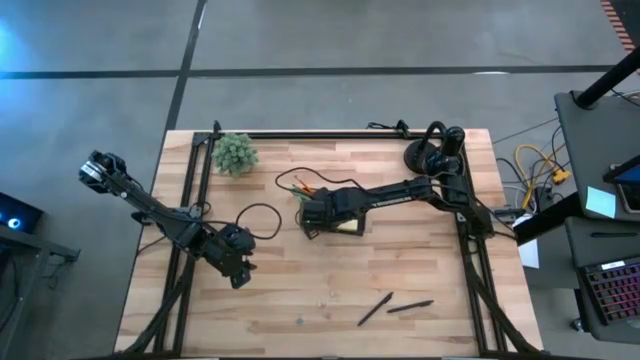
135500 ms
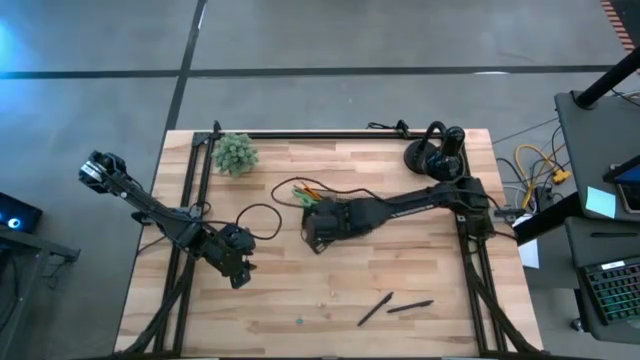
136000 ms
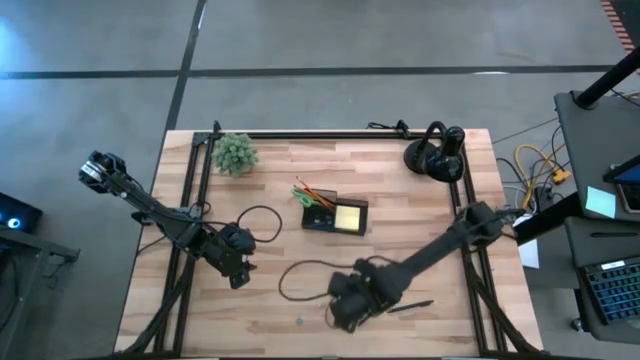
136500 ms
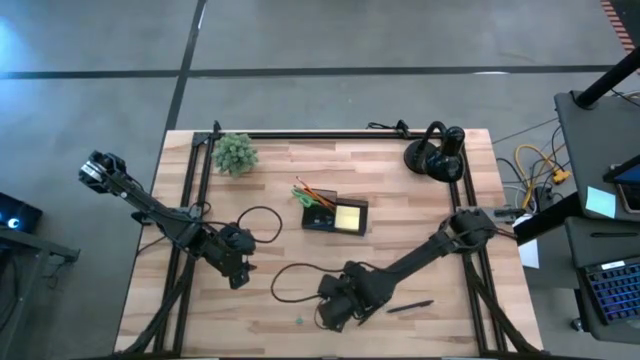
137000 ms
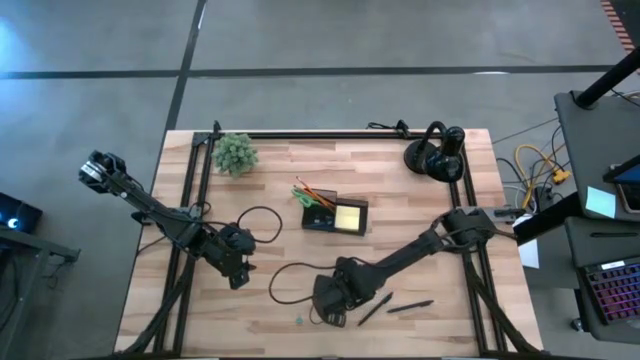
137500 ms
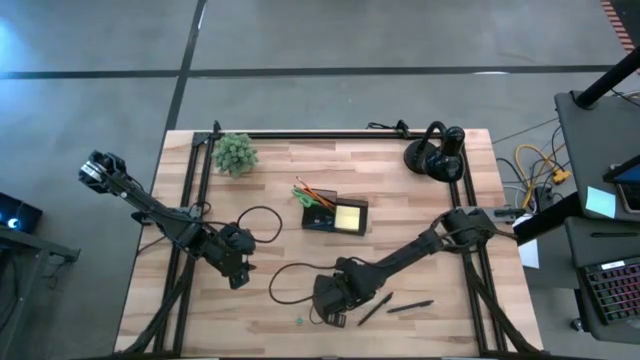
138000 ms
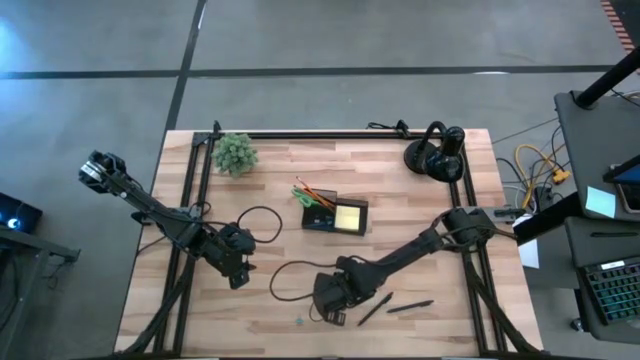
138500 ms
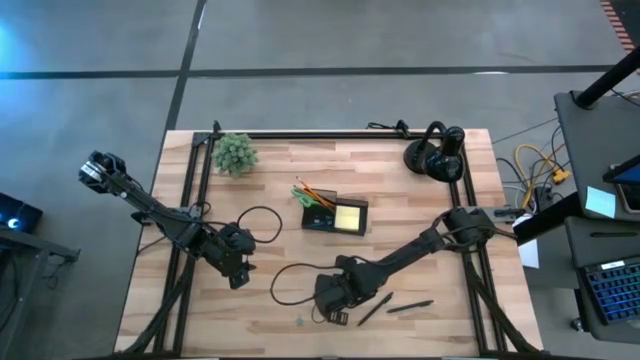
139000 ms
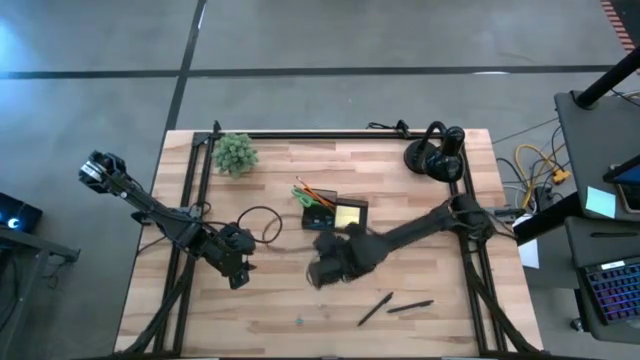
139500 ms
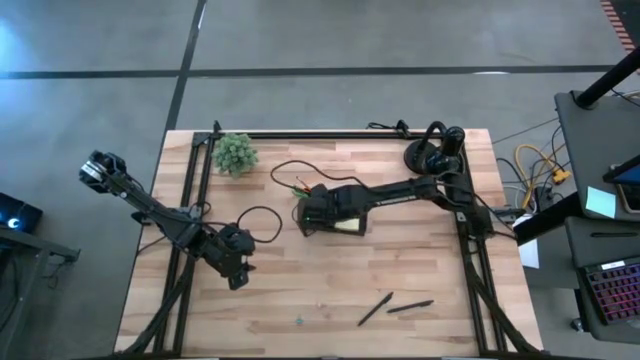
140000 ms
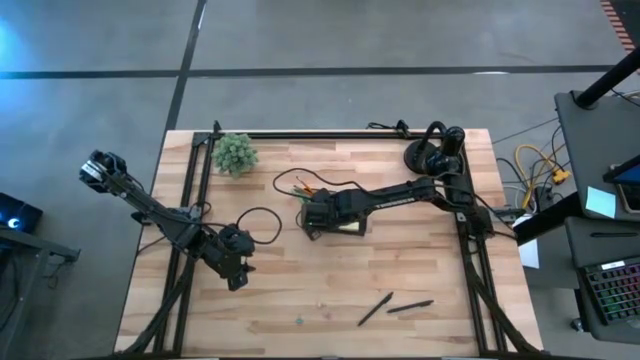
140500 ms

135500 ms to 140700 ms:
Task: Pick and place office supplies into organizer
Put the top yellow binder clip into the black desk organizer

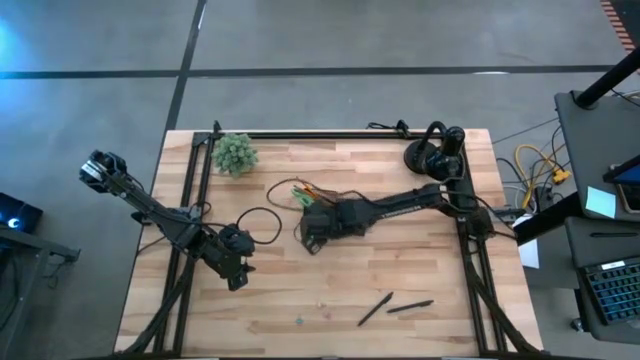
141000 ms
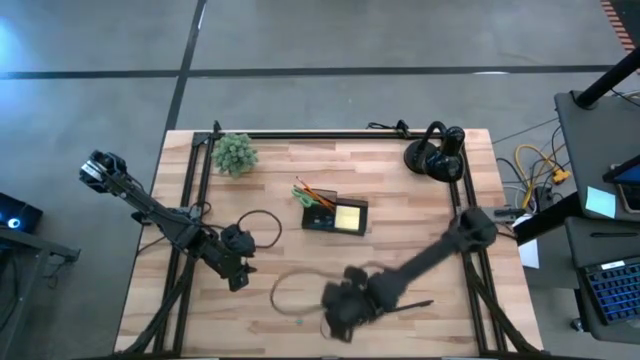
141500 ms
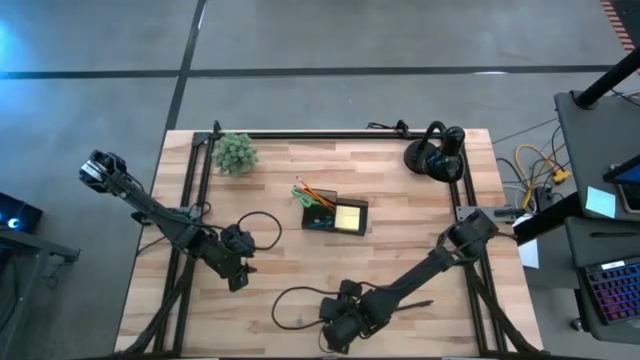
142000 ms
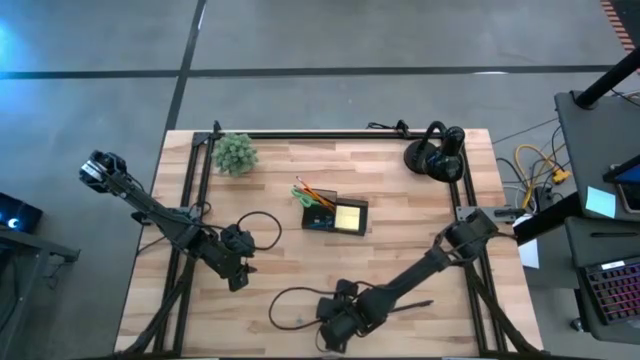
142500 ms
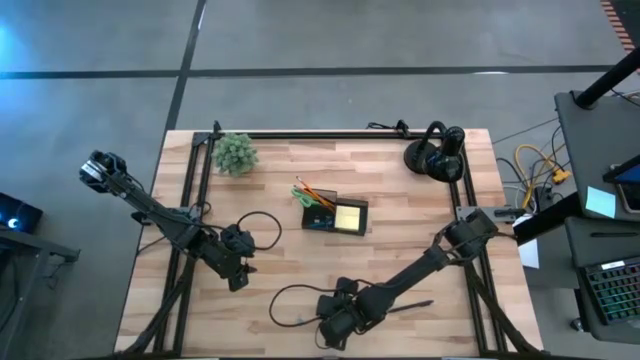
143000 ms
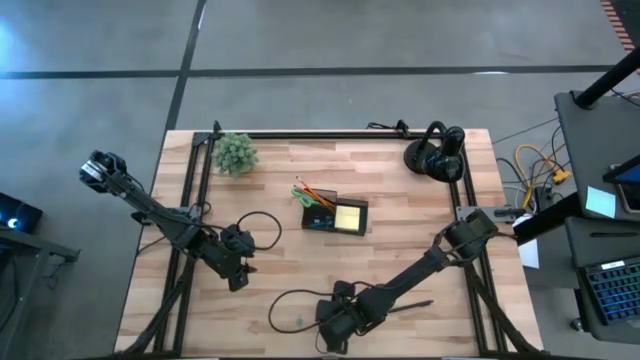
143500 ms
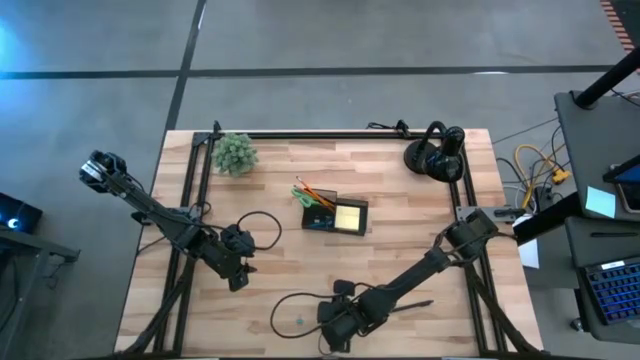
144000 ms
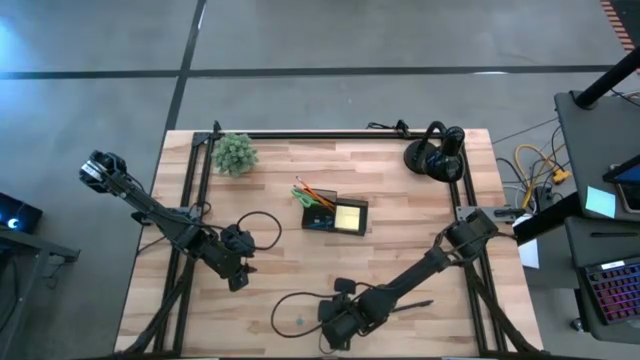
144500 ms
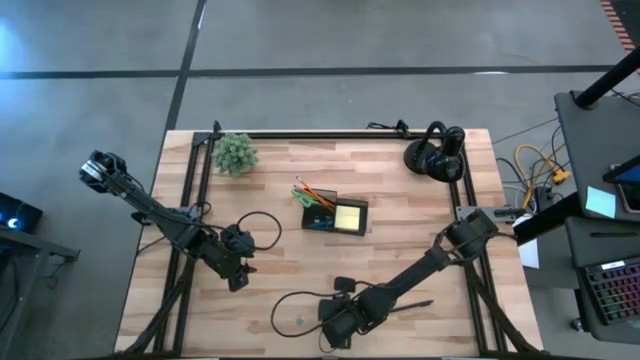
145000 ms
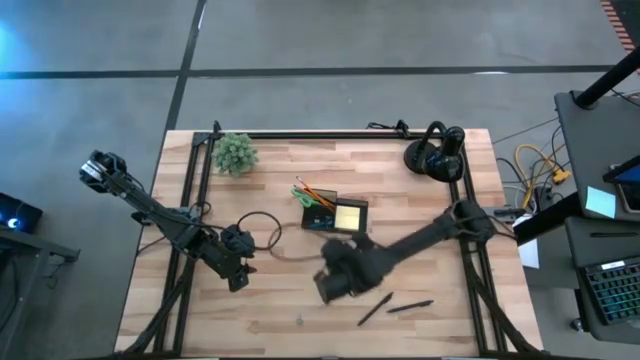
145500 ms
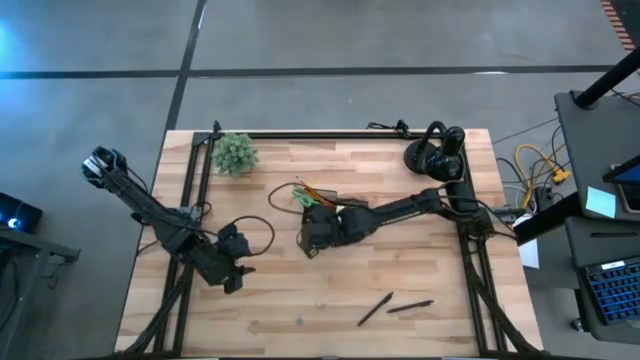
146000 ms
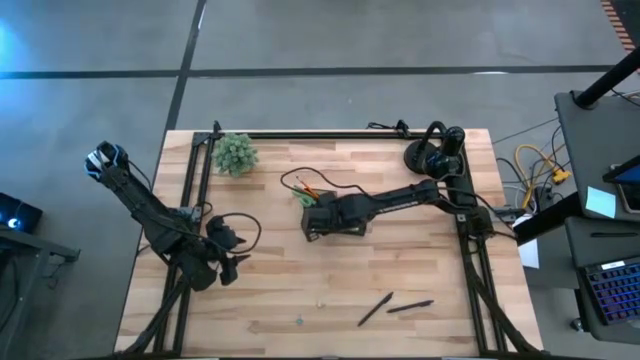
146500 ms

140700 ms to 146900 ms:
Put the pink binder clip into the black desk organizer

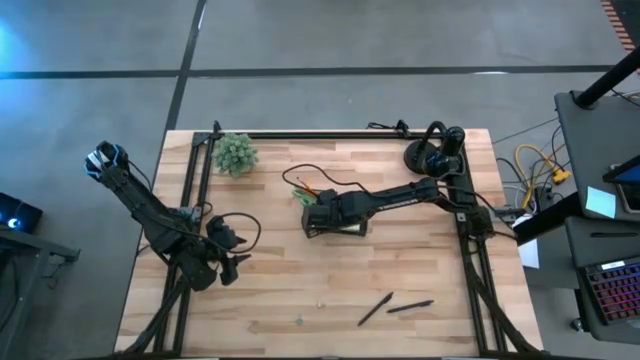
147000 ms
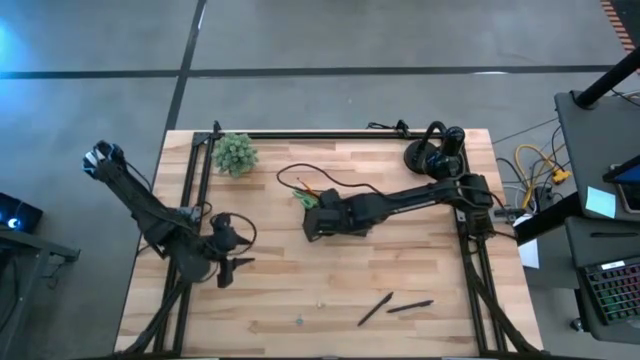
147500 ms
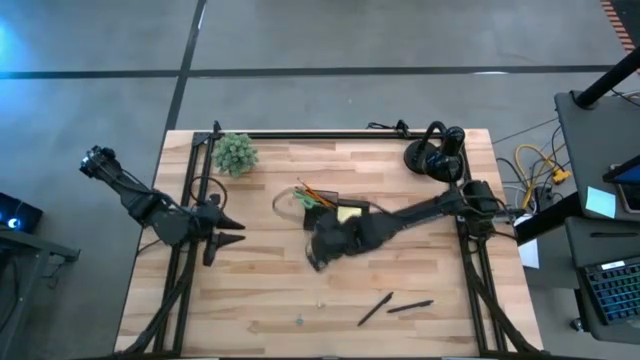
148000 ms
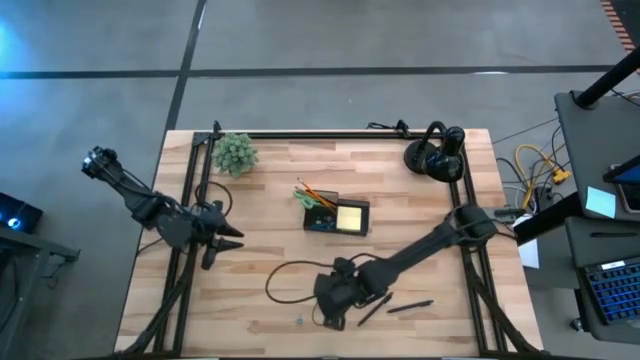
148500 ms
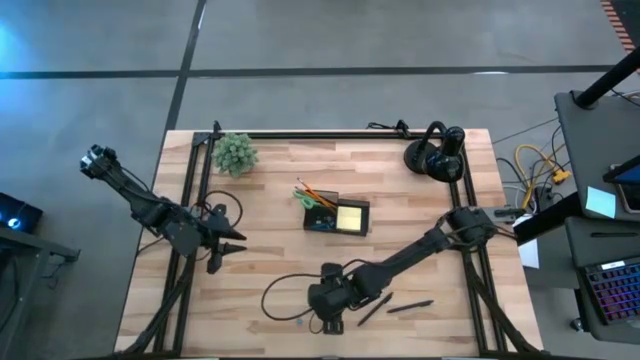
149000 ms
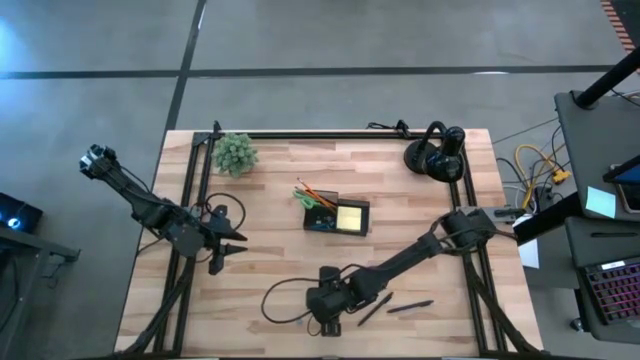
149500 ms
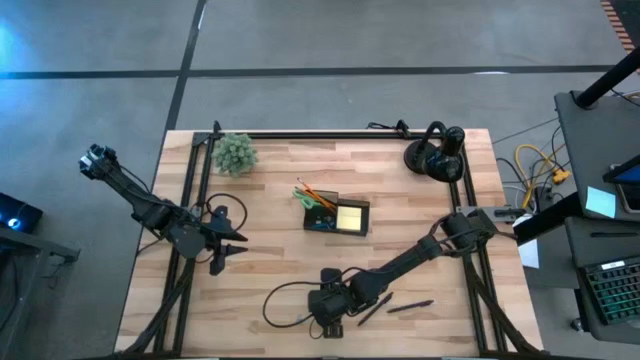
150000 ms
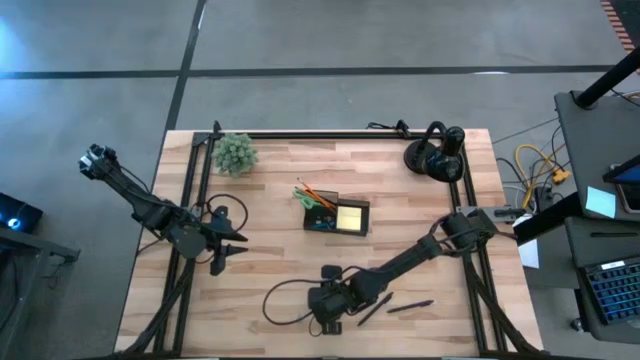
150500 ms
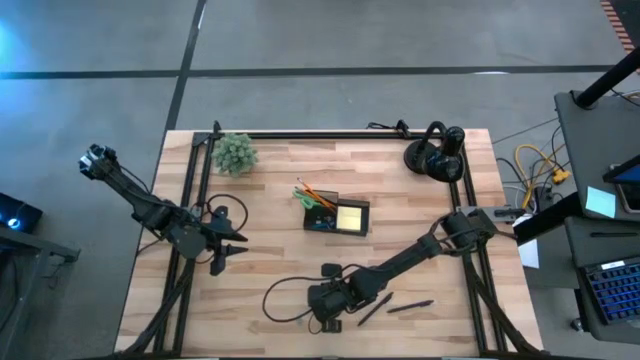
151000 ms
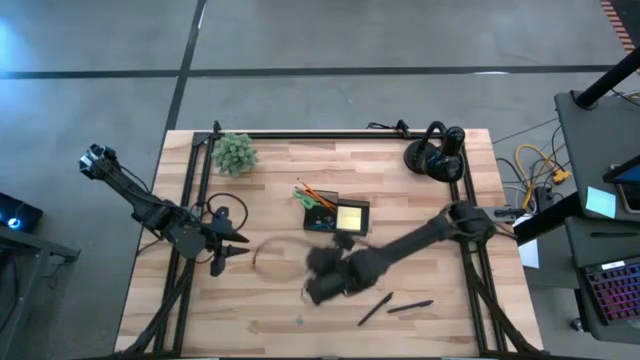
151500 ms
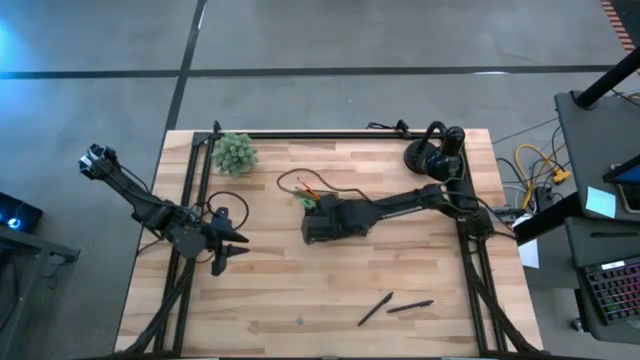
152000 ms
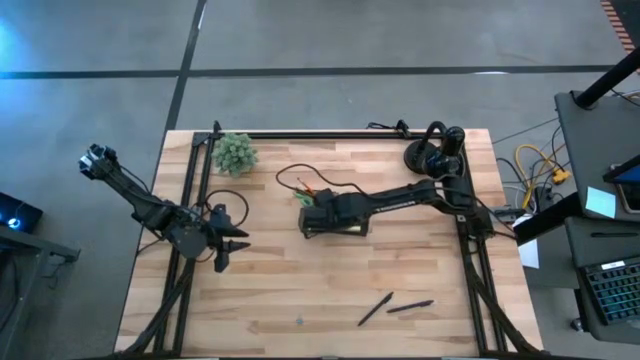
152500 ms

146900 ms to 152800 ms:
Put the yellow binder clip into the black desk organizer

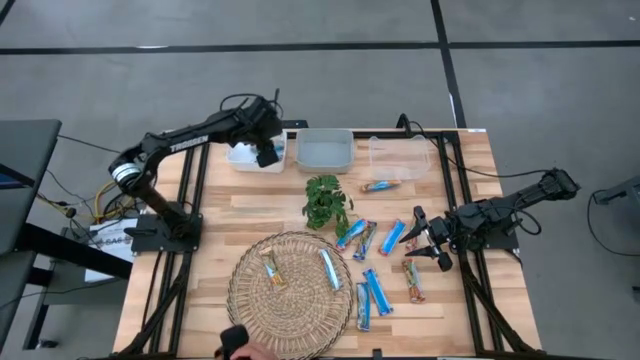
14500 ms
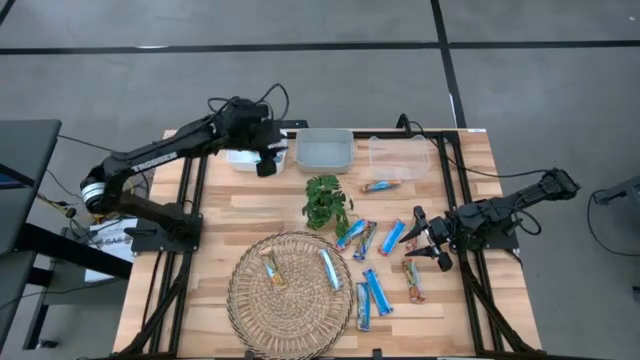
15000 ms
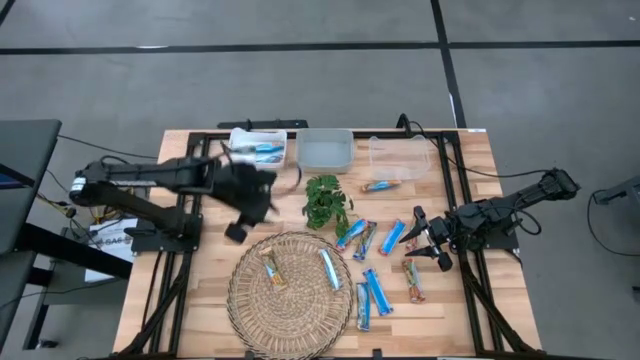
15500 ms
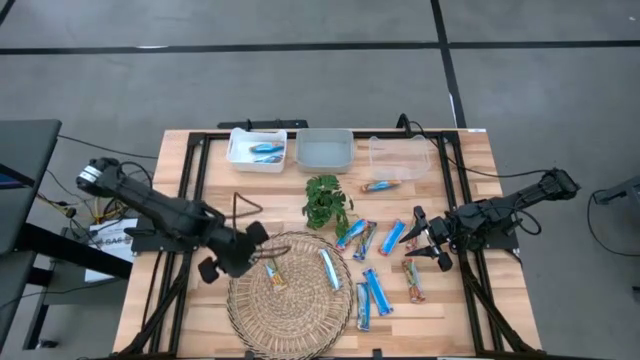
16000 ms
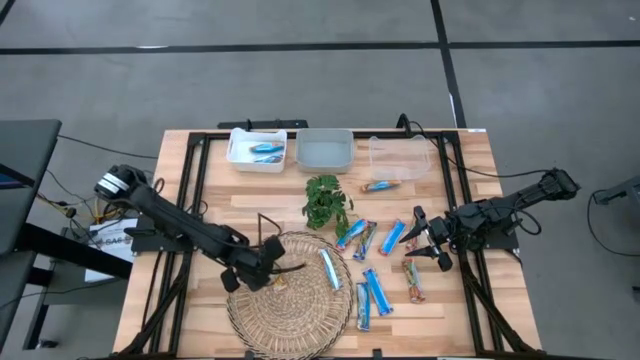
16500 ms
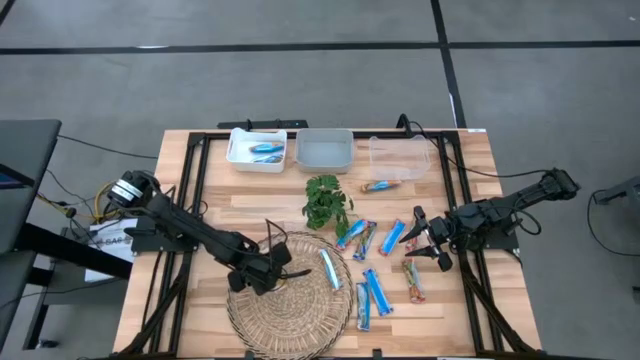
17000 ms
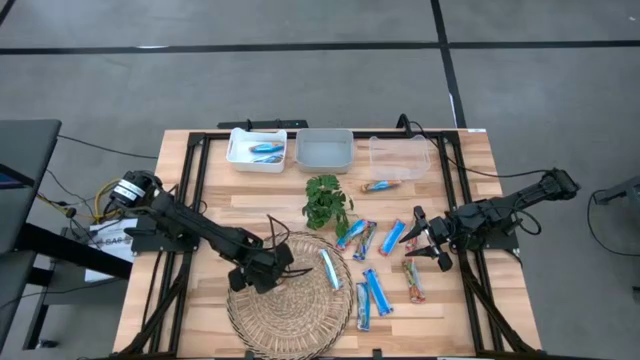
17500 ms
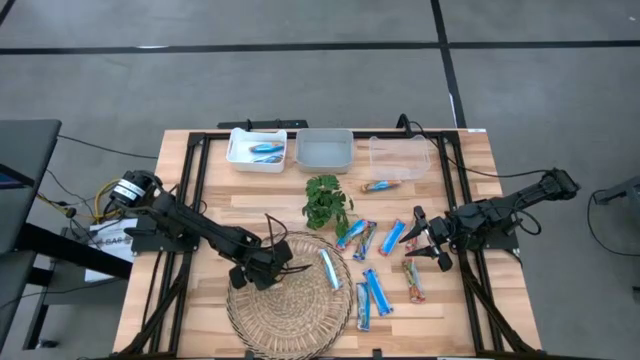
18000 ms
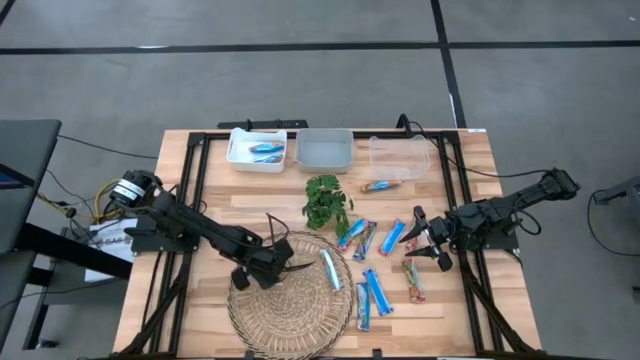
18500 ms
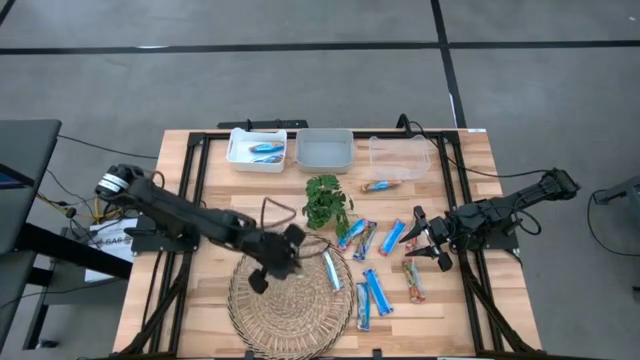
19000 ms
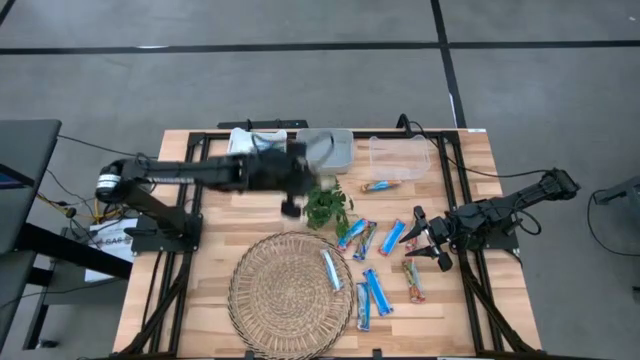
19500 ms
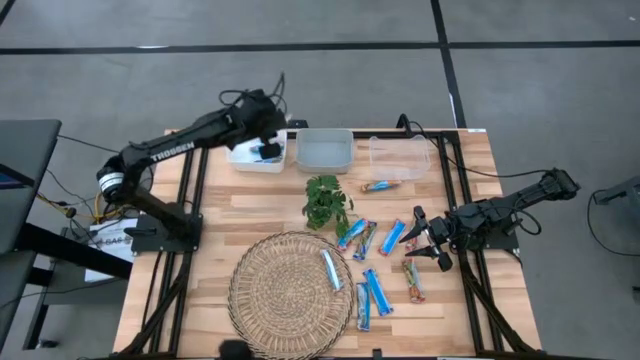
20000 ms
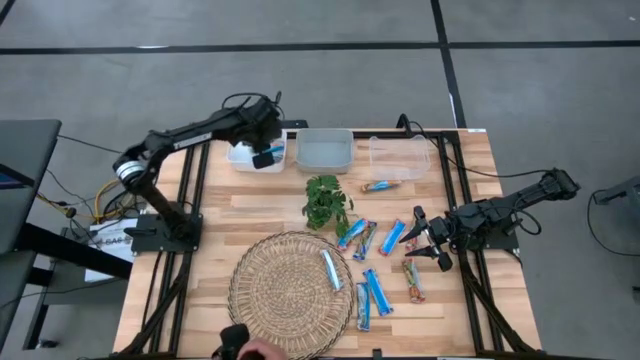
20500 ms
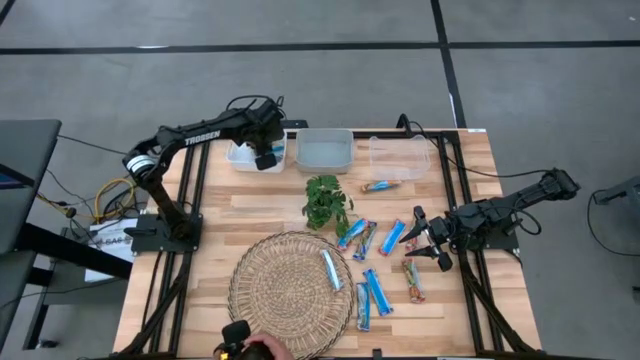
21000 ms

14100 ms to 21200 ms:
Task: Pick and place Granola Bars by type
Put the yellow granola bar into the white bin
